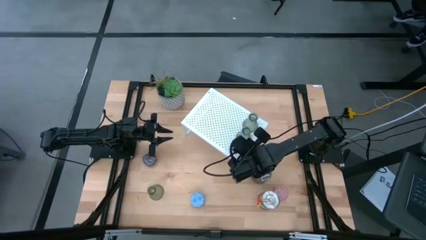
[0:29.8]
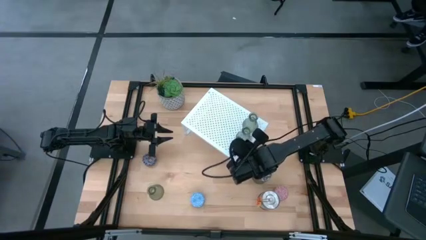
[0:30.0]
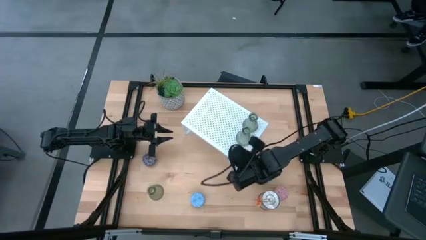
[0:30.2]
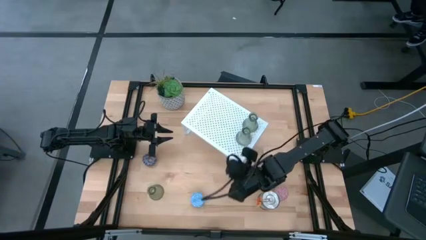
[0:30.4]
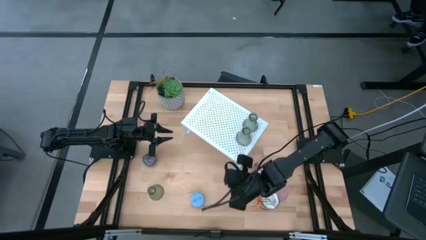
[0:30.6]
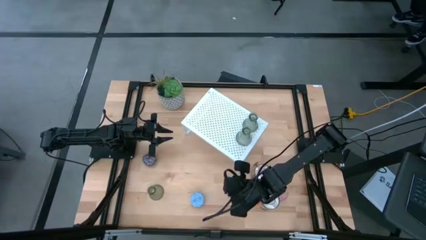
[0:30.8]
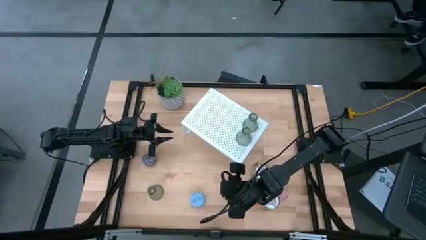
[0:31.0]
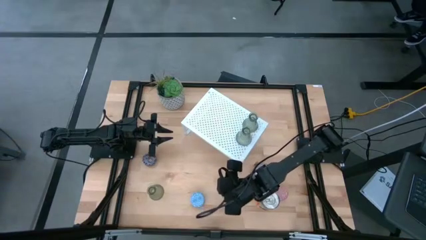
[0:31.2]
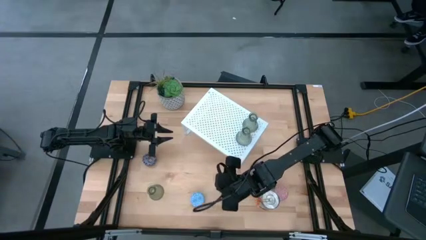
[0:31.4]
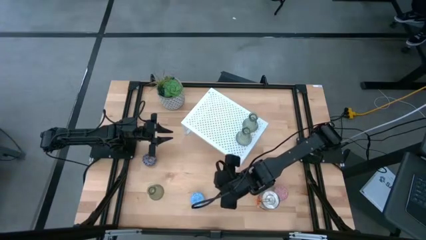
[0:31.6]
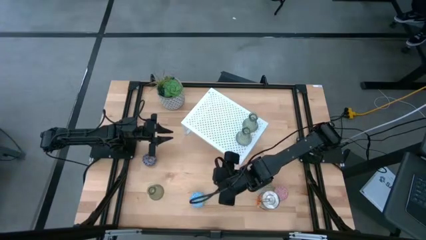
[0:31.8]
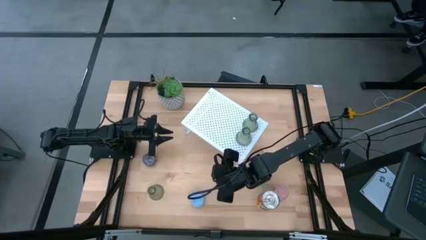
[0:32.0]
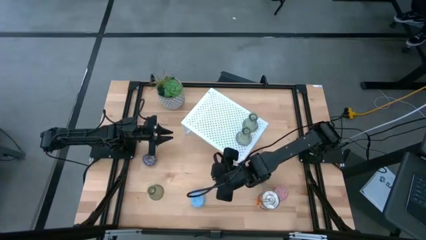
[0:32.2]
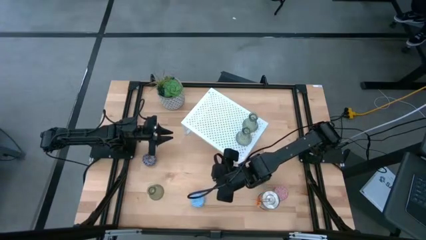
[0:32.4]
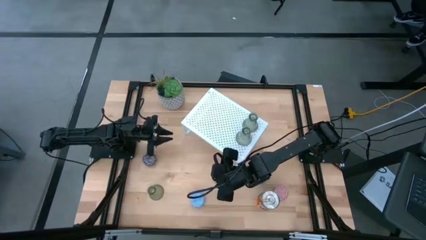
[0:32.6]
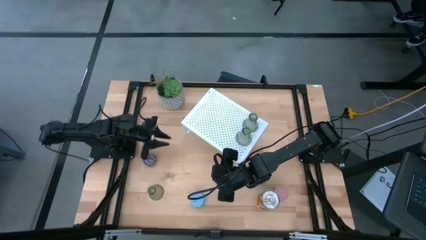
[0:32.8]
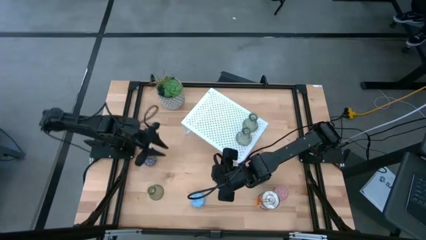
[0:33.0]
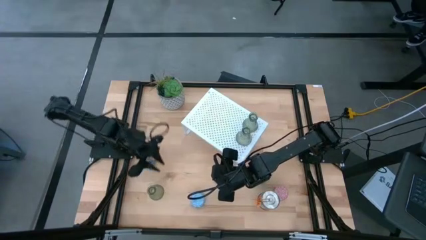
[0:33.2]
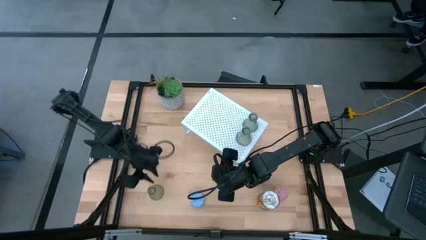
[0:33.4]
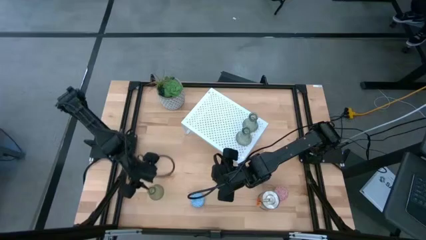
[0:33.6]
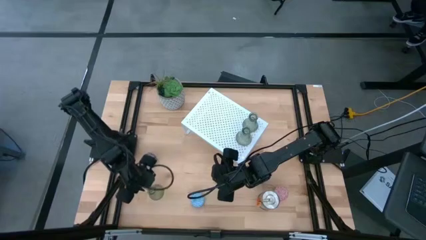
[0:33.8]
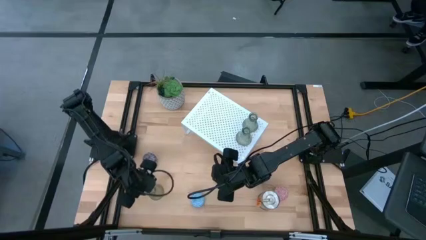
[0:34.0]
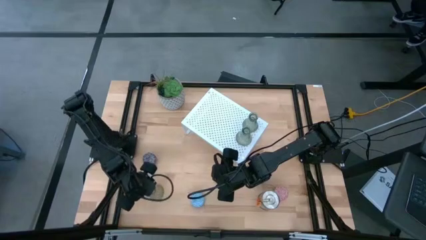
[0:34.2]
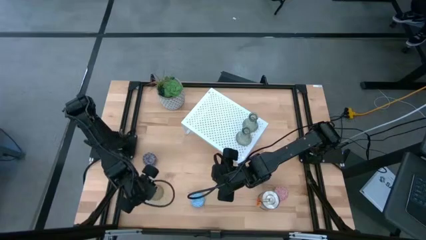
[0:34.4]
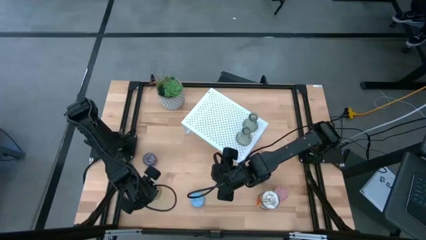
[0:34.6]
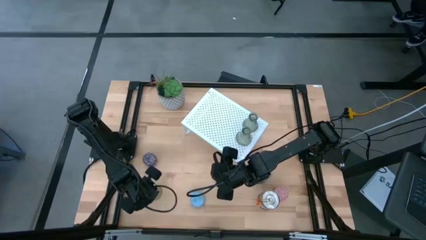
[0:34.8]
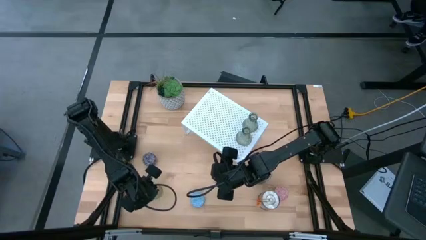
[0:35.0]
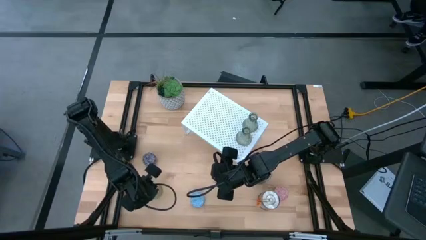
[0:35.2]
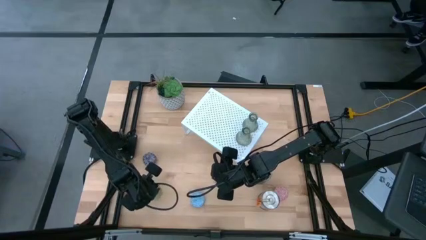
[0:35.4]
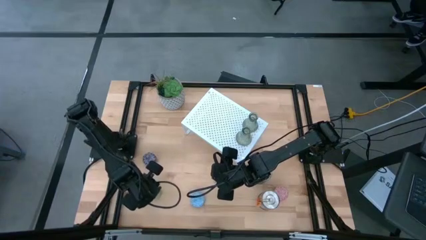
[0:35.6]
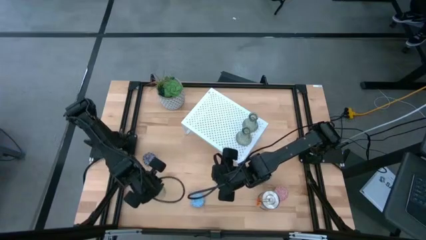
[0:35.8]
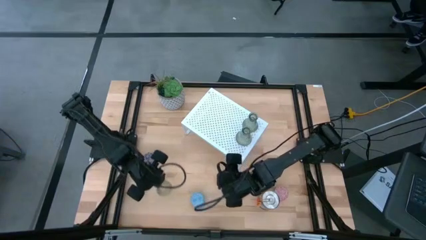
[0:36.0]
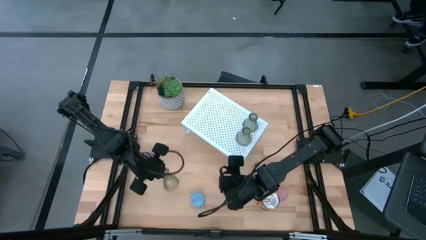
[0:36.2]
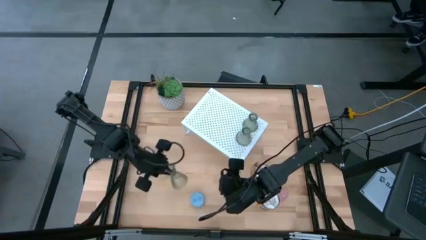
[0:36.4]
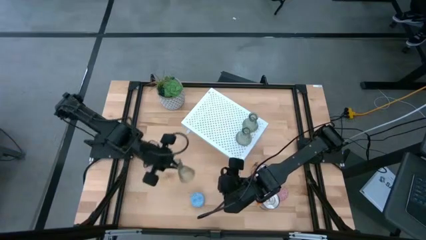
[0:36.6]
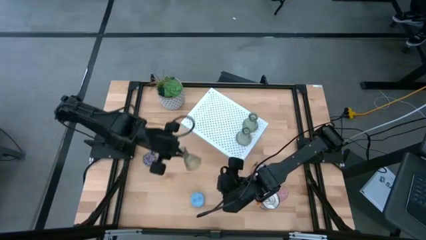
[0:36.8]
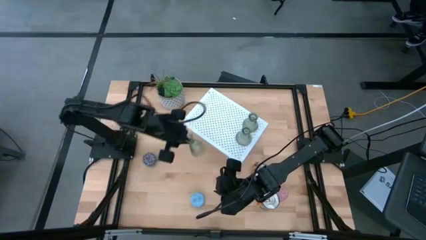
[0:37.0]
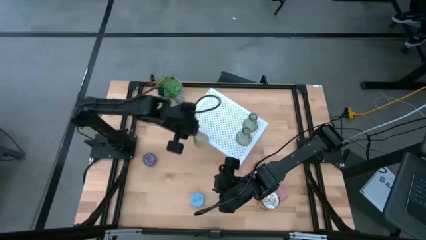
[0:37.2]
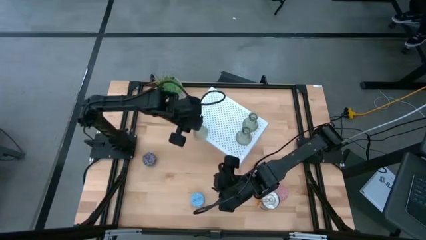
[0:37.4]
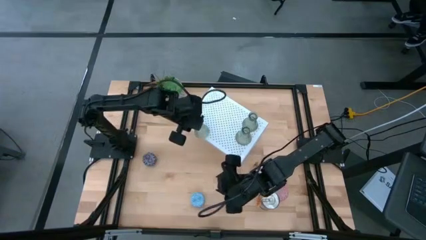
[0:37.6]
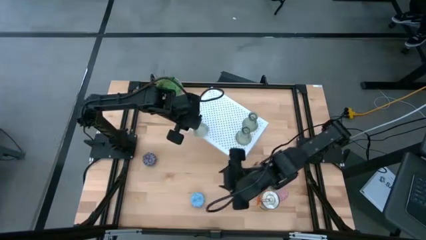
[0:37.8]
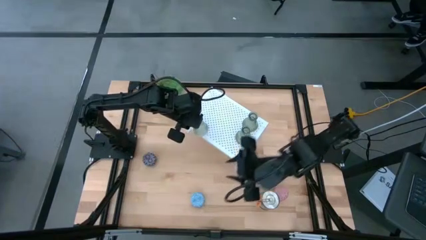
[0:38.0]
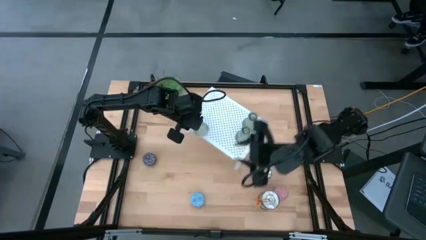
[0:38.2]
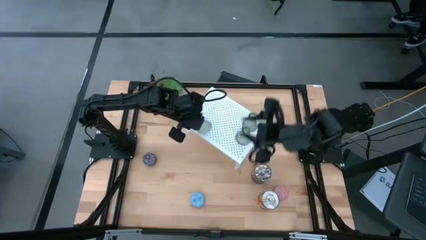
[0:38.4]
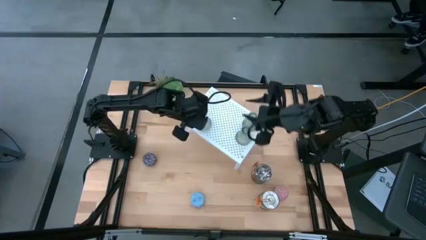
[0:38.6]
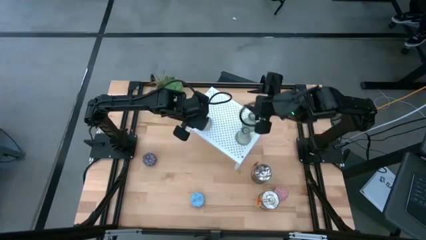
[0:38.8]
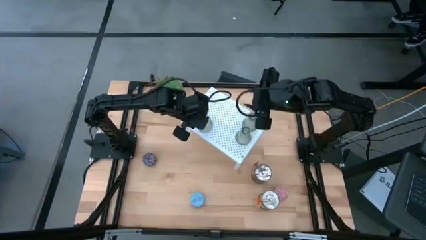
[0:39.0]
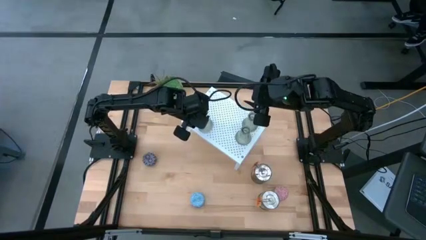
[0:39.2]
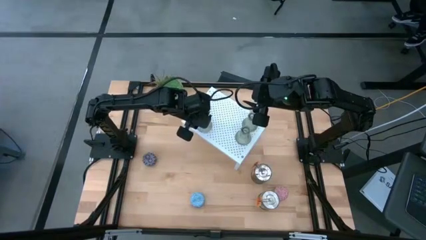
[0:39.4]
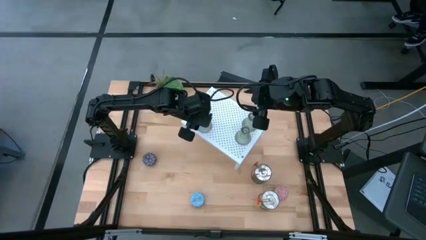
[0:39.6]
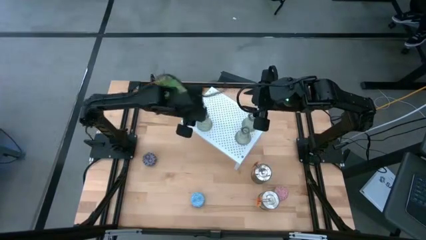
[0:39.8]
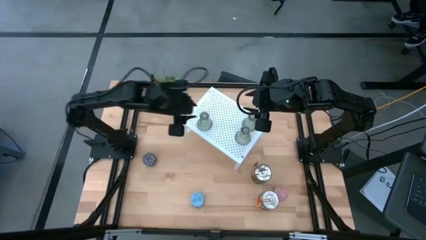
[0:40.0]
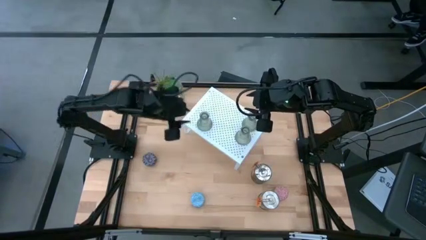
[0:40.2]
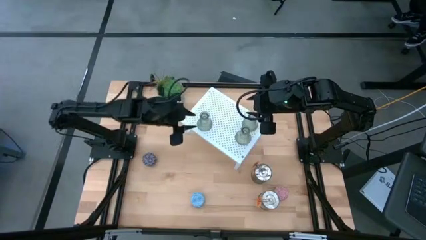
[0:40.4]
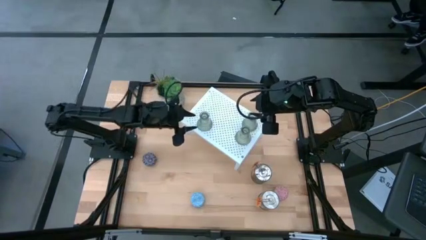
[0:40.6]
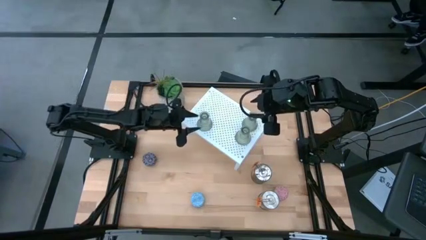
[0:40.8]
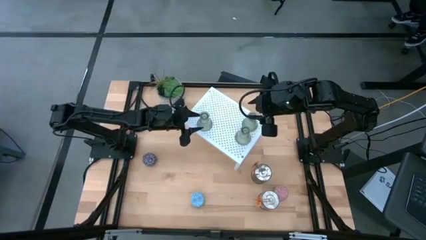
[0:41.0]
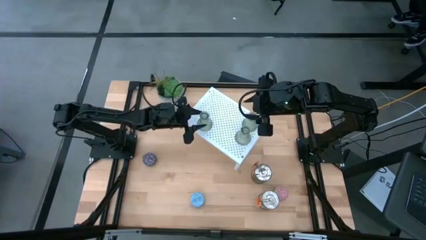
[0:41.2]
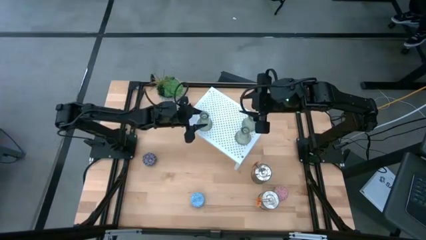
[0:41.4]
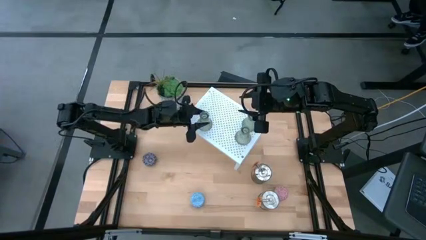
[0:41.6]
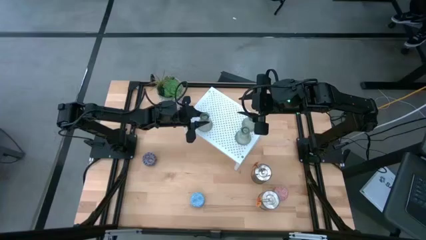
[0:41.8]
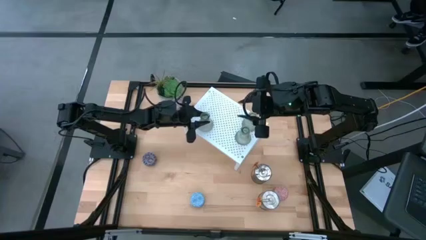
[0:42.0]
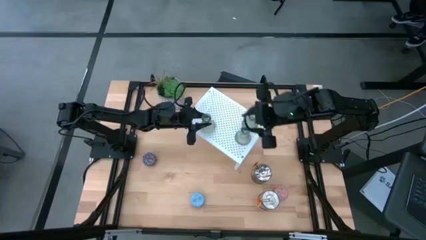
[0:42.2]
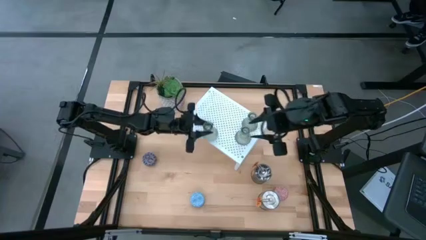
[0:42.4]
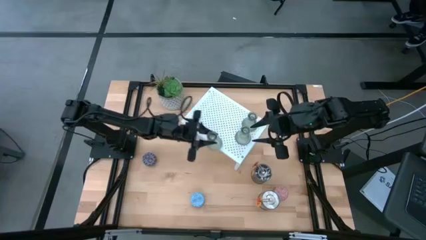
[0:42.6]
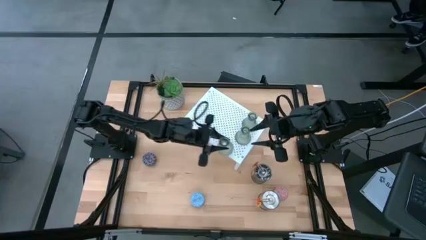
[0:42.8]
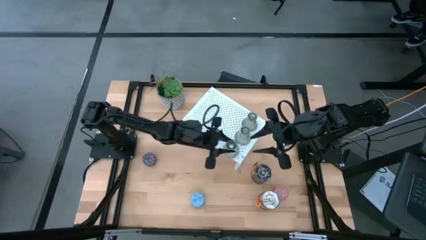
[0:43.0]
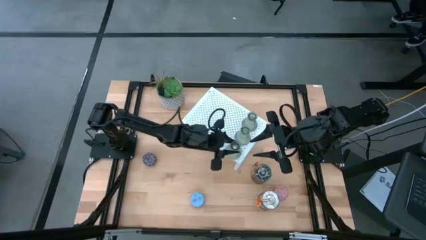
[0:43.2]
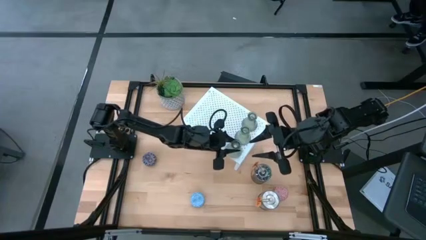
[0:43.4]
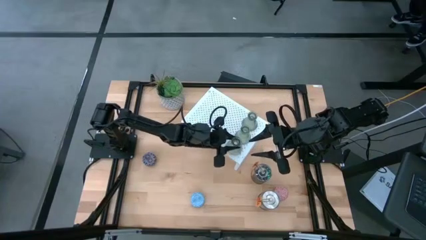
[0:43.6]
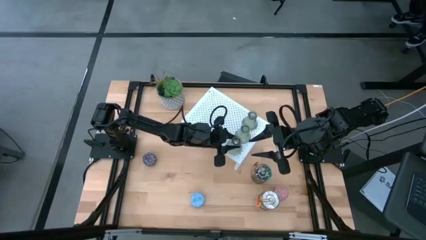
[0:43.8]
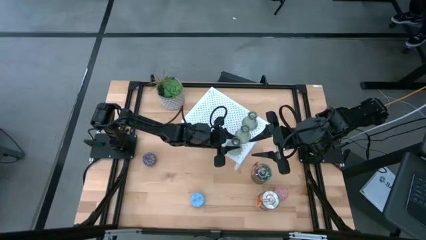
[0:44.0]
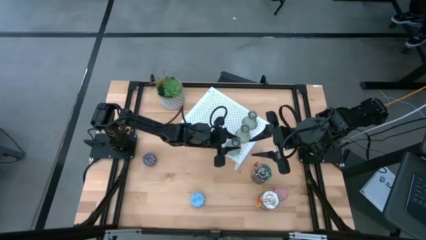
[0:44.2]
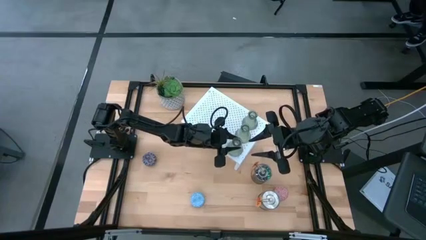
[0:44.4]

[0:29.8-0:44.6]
Task: Pick & Place candle stick holders
Put the green vase on the shelf aligned with the other green vase

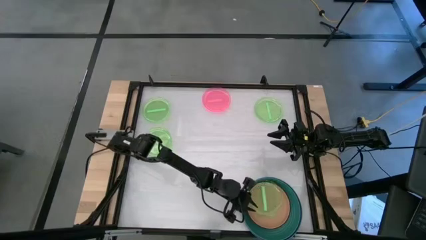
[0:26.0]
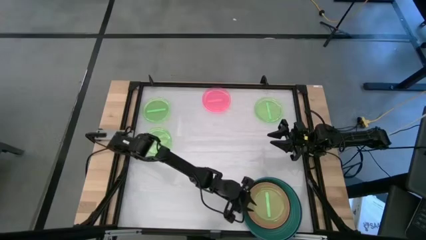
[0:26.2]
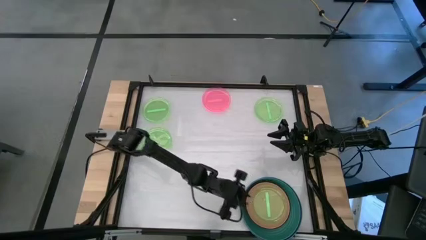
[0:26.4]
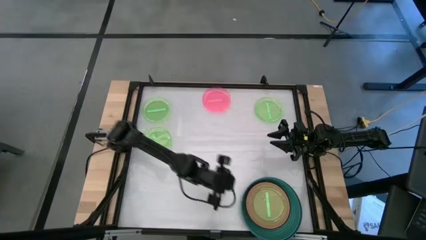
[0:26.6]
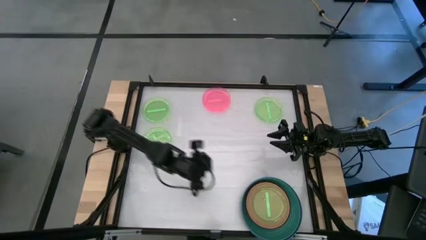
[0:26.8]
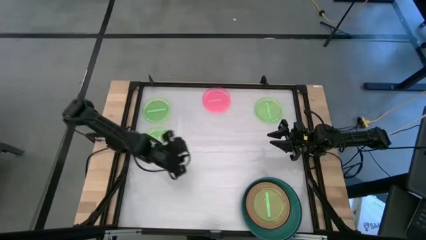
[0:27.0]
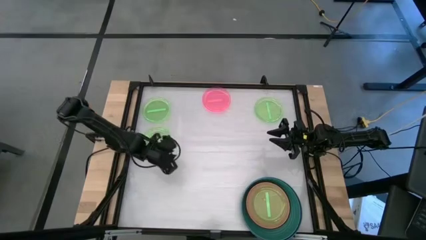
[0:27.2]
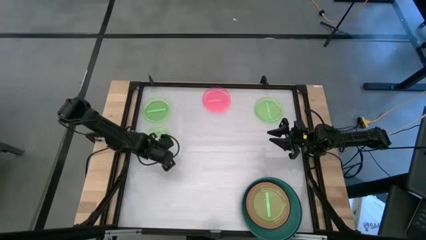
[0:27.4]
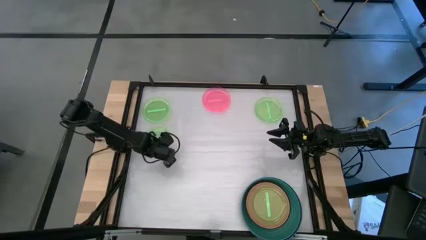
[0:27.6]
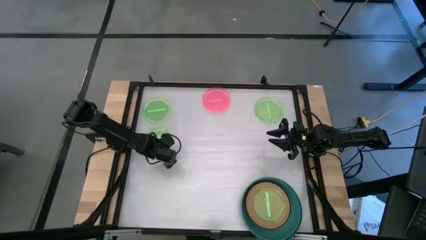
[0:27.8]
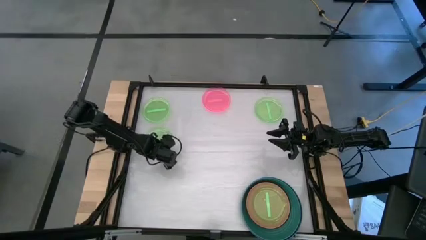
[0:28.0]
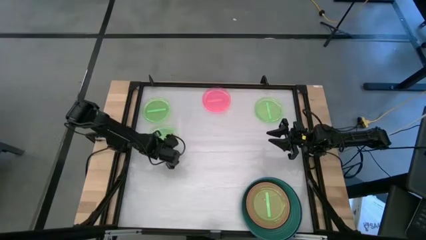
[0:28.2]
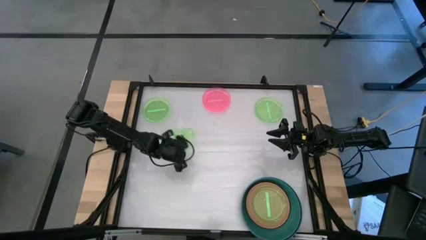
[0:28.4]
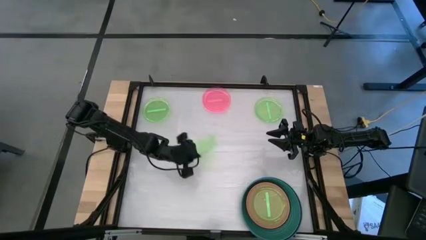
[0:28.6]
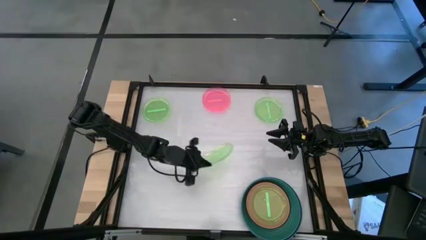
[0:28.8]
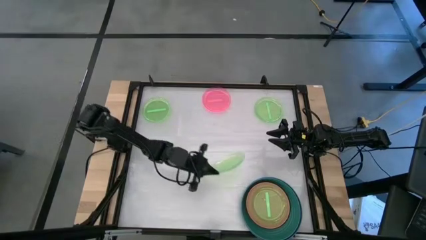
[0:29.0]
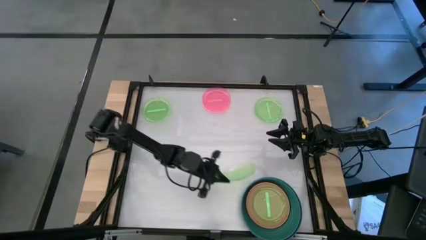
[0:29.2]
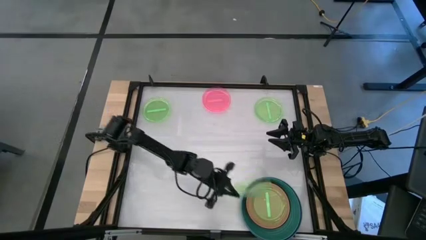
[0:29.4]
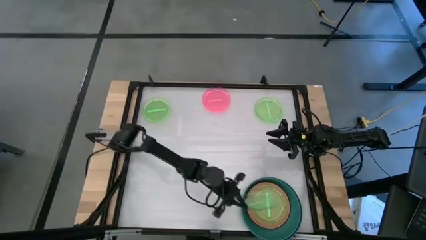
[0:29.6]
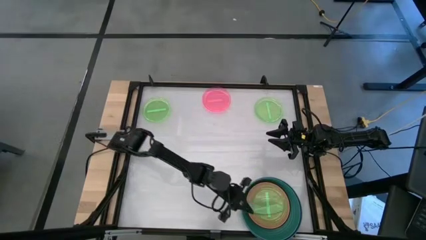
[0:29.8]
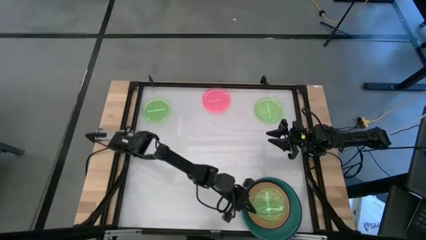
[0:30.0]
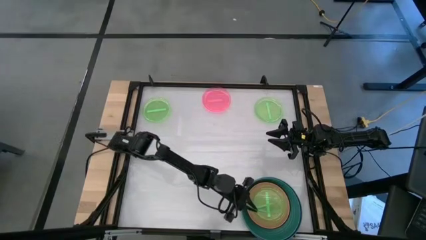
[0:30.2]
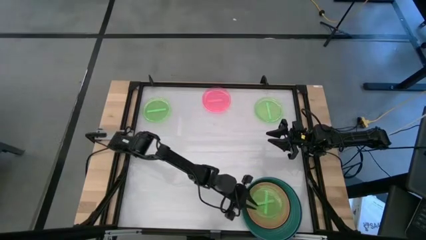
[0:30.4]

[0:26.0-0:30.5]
Task: Stack plastic plates
Stack the light green plate on top of the light green plate
